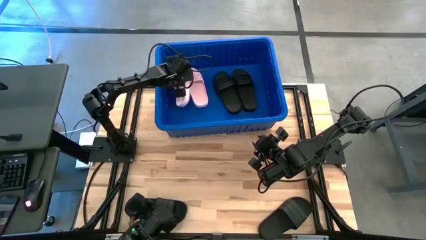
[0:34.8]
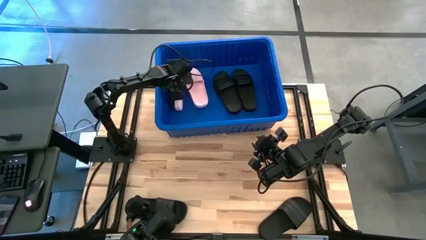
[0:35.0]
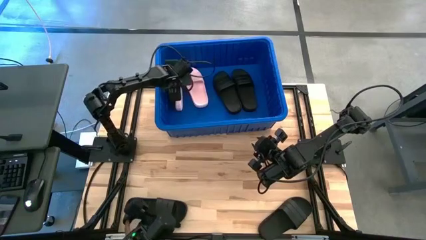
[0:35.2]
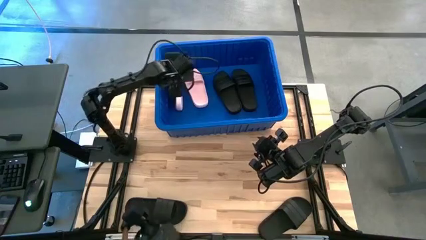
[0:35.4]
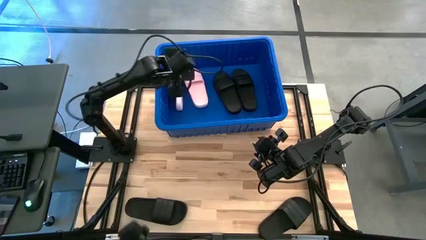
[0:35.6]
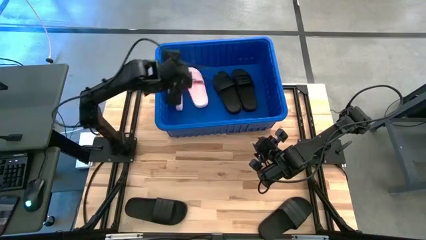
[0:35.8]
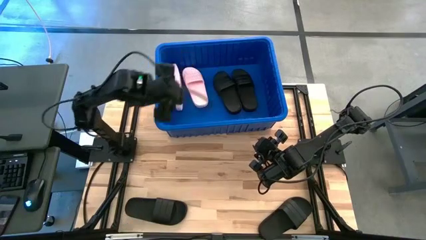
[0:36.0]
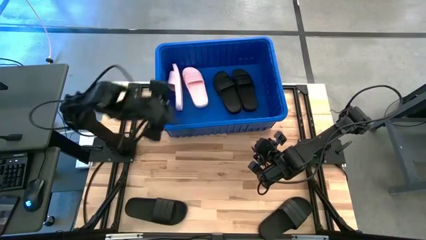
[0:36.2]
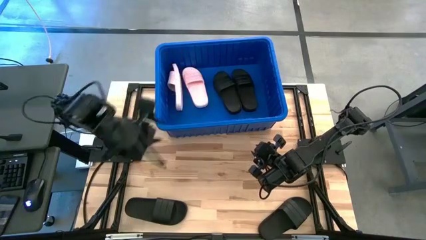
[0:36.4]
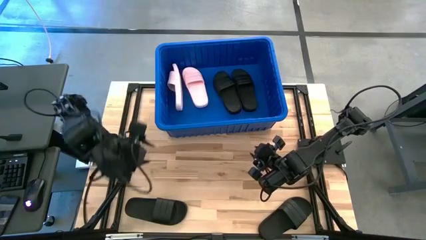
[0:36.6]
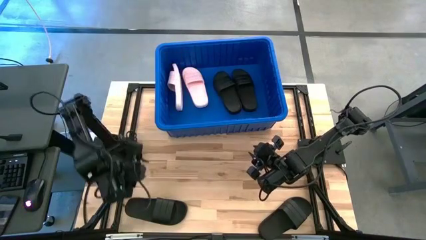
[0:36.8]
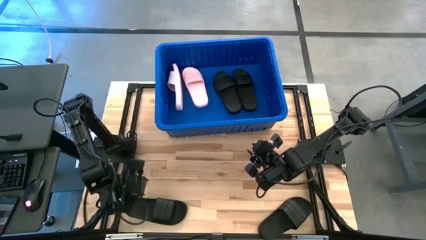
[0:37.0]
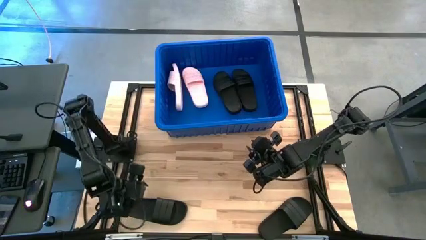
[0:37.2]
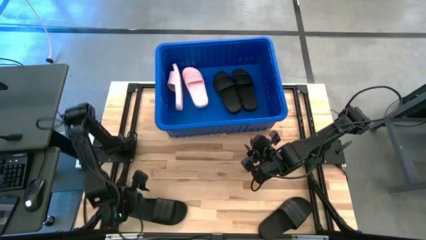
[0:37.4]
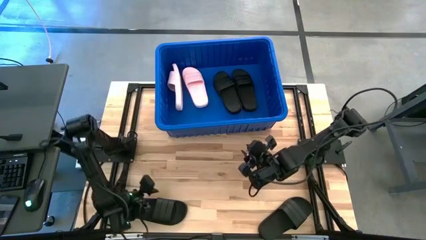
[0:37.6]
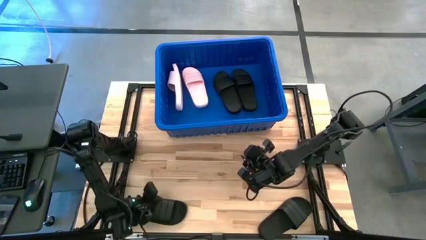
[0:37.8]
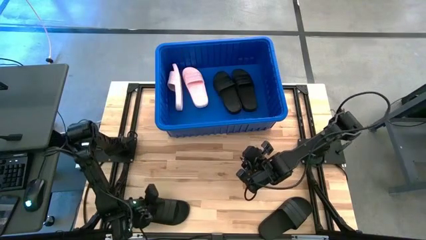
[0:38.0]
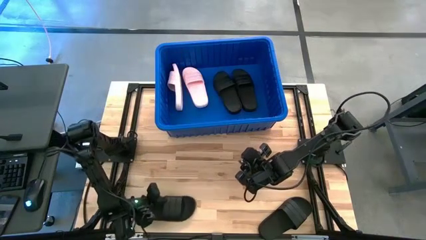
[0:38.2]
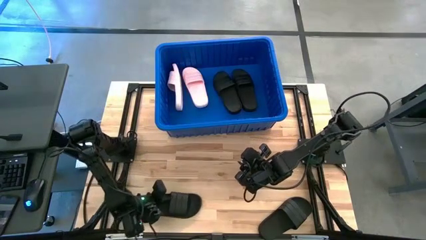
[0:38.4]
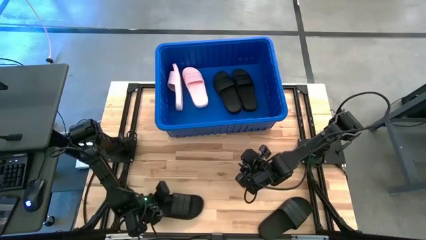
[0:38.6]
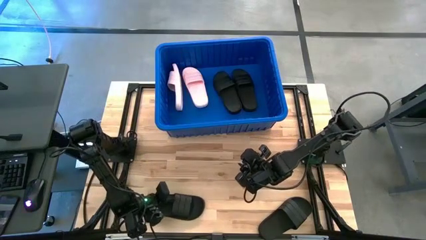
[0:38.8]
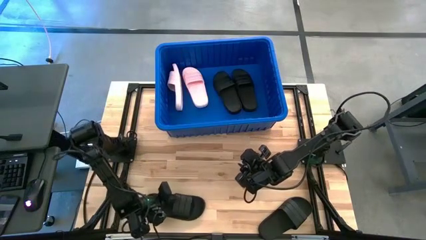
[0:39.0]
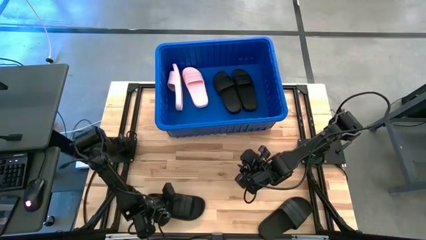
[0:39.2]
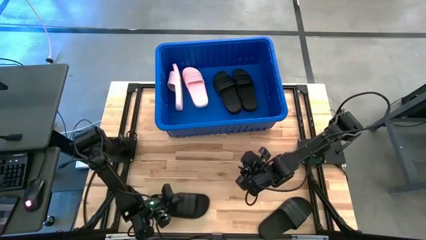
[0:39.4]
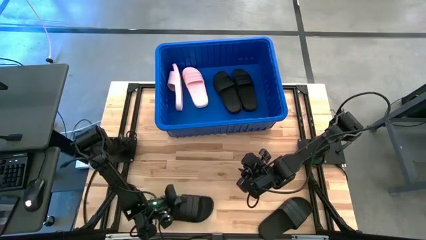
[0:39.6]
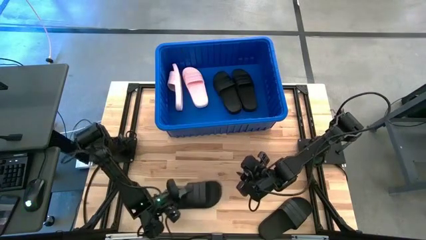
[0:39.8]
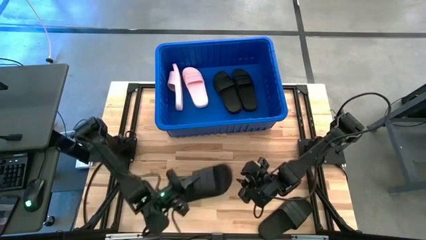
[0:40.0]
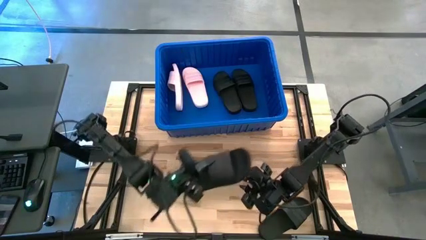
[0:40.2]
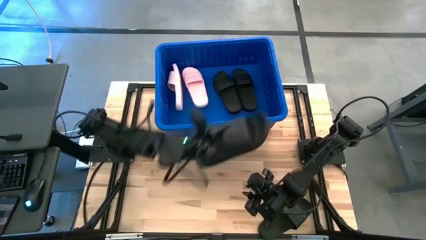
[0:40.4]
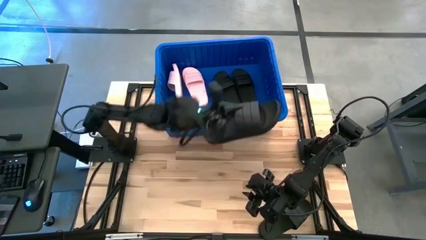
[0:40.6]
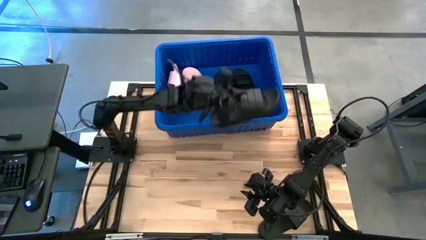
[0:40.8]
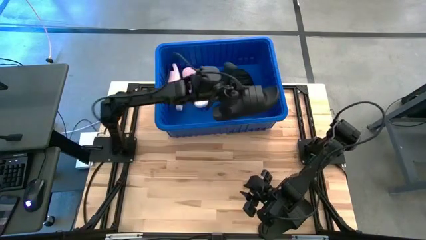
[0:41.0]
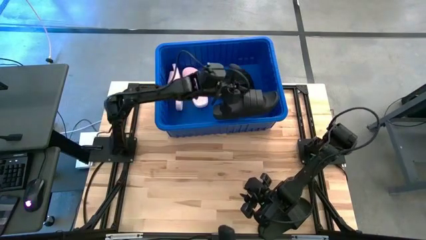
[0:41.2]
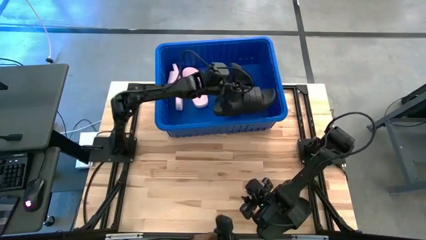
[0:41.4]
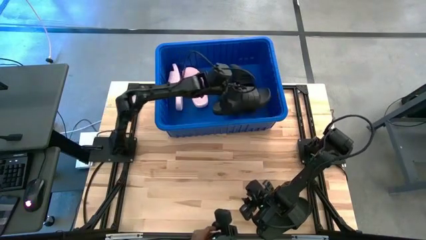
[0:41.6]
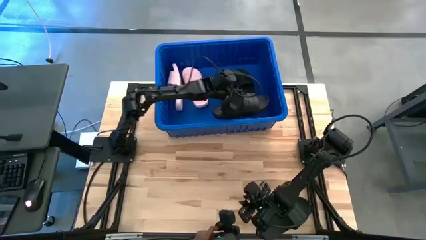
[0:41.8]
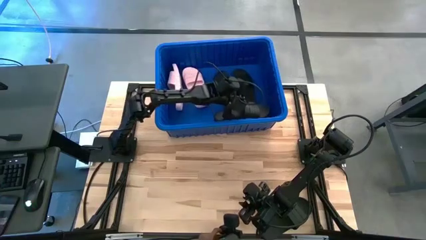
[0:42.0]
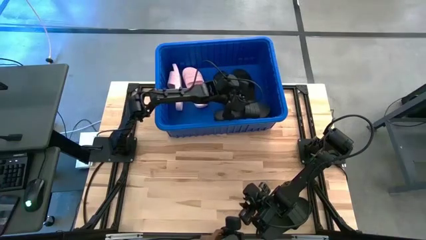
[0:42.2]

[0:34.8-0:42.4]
Task: Pick and place slides into bin
Put the black slide into the blue bin

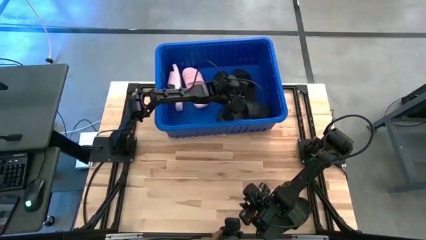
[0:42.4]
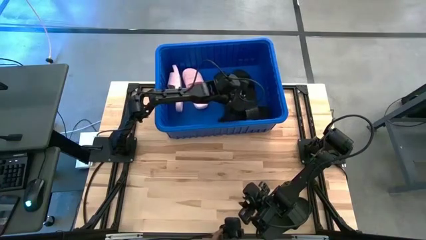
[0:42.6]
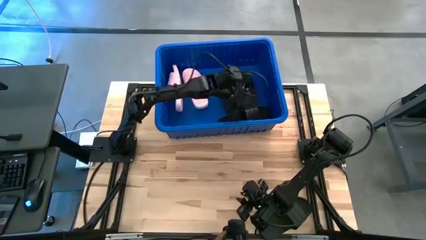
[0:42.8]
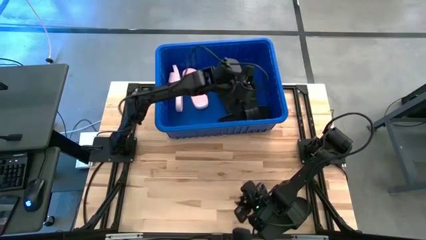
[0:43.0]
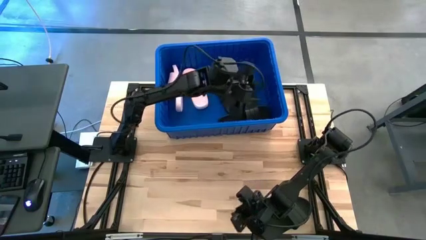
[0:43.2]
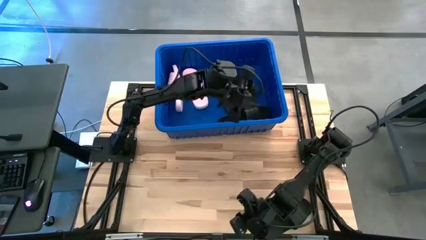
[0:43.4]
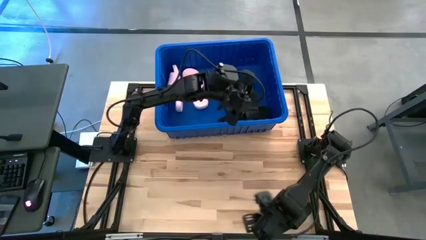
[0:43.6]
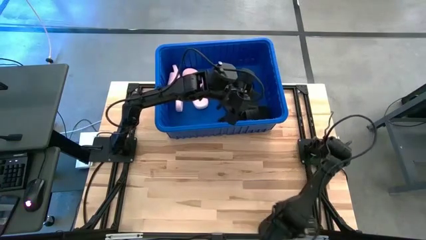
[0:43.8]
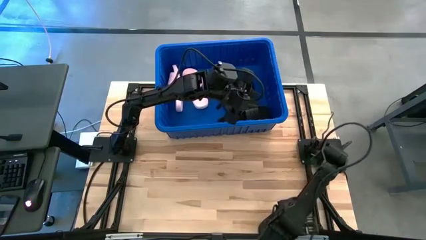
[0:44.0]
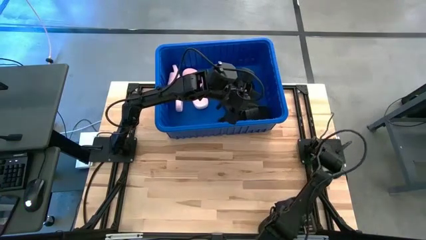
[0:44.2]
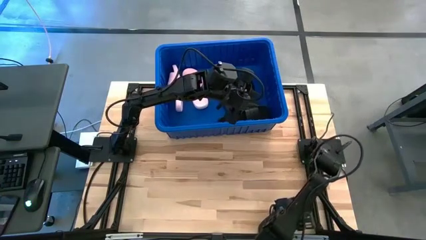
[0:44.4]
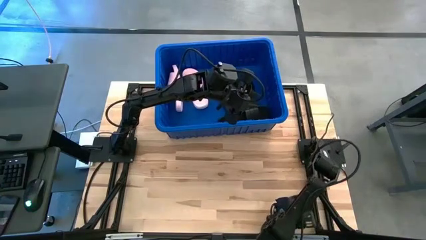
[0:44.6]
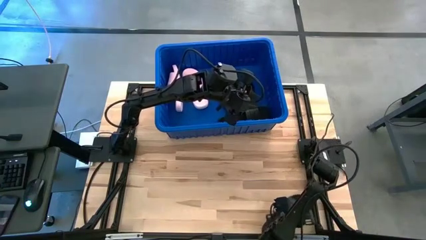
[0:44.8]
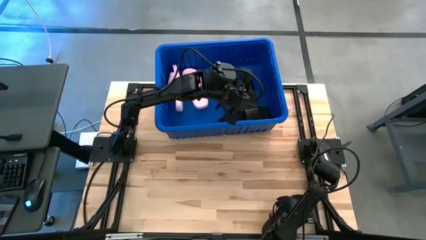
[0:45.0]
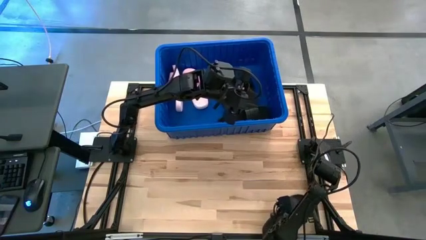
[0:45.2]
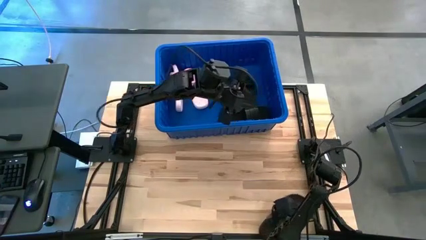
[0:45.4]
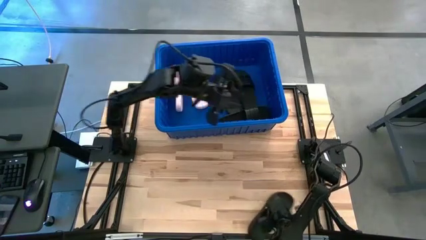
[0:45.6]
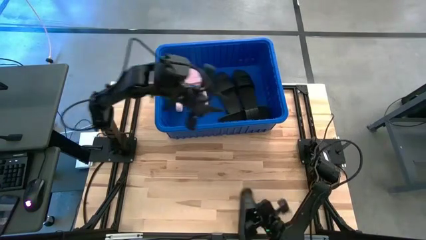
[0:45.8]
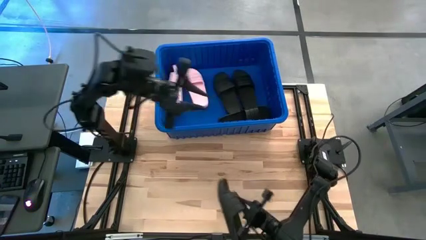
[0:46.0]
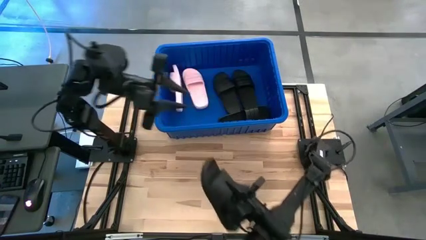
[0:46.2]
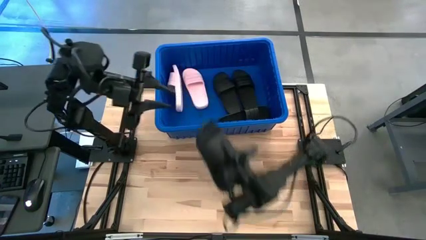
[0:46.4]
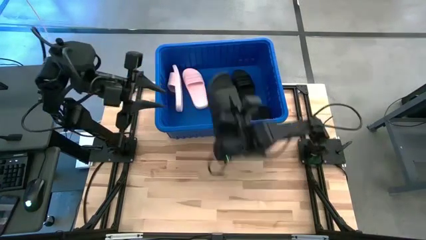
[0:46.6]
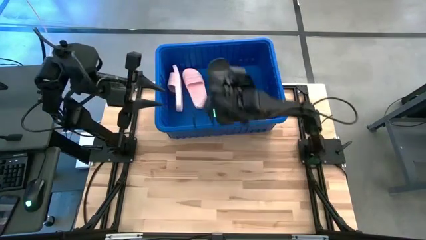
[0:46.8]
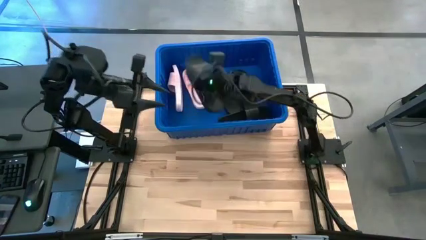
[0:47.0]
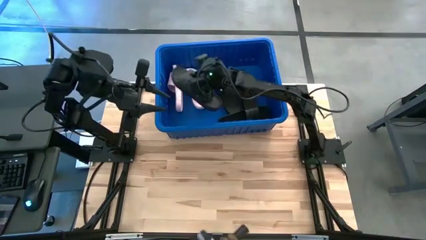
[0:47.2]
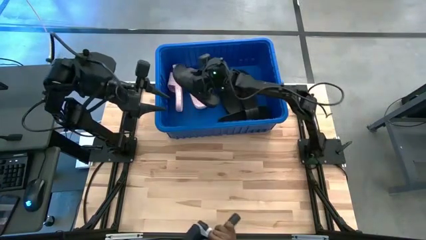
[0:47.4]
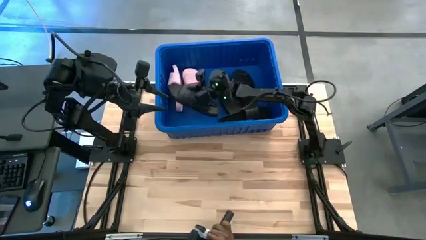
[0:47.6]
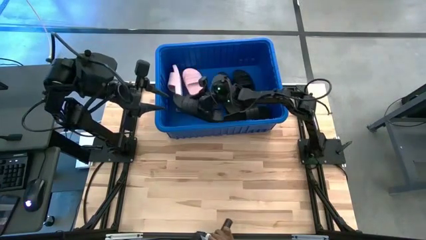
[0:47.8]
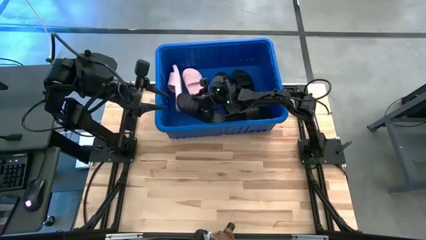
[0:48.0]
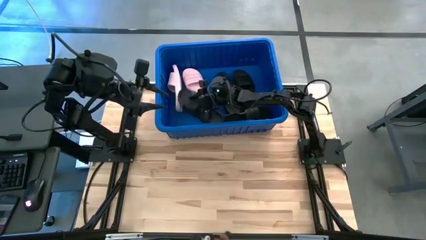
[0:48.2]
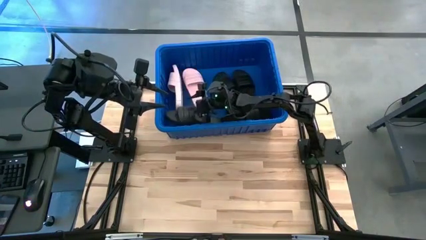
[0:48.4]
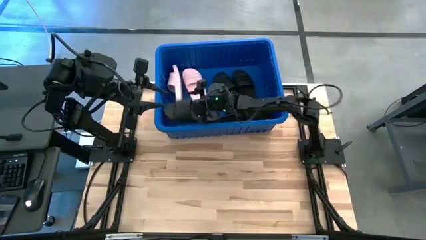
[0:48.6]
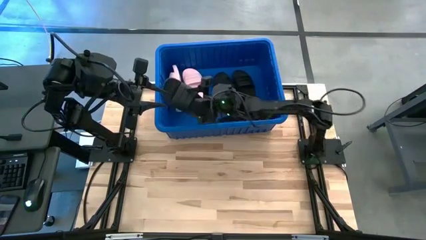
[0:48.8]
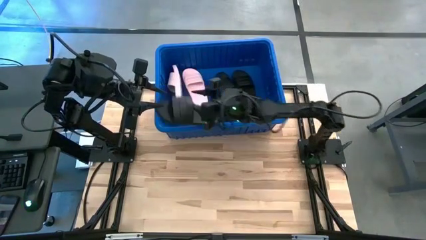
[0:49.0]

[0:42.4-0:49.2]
Put the black slide into the blue bin

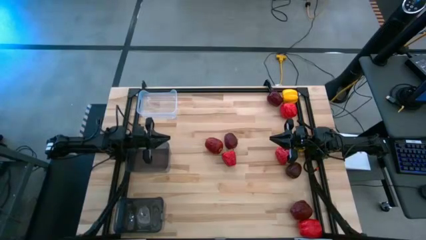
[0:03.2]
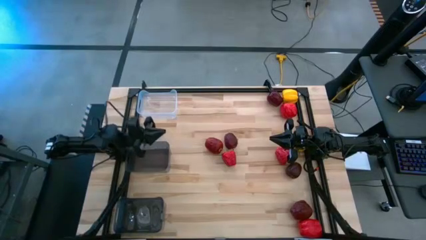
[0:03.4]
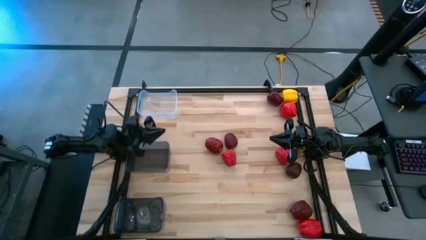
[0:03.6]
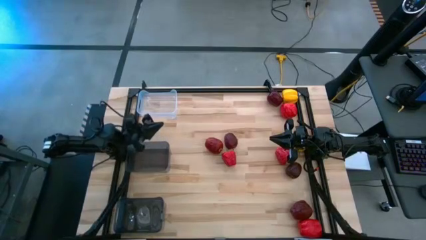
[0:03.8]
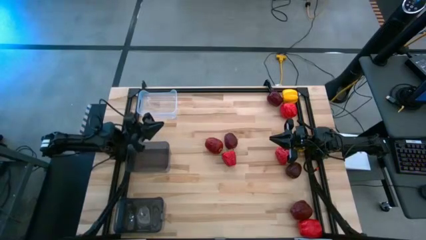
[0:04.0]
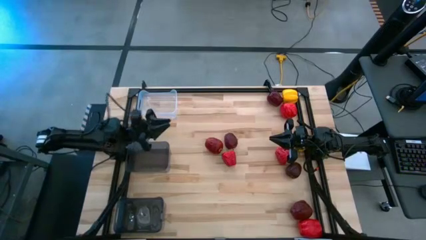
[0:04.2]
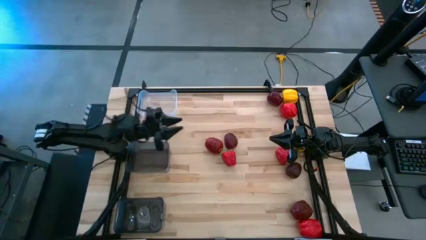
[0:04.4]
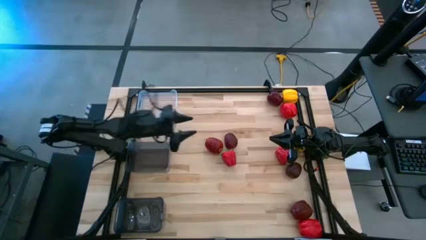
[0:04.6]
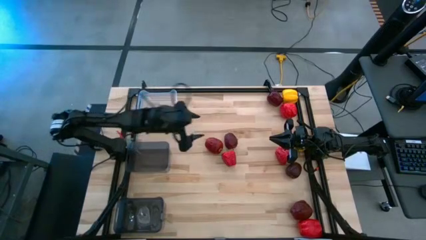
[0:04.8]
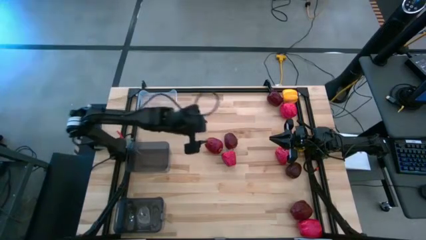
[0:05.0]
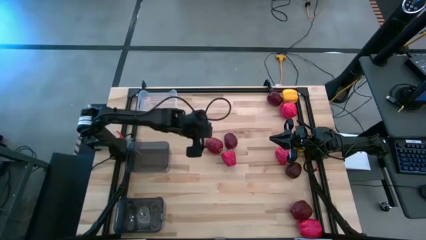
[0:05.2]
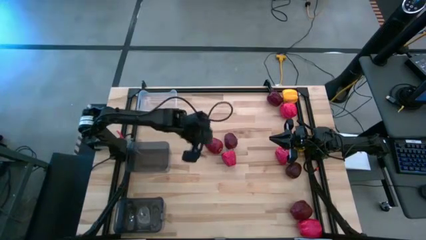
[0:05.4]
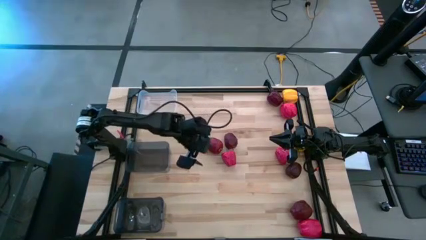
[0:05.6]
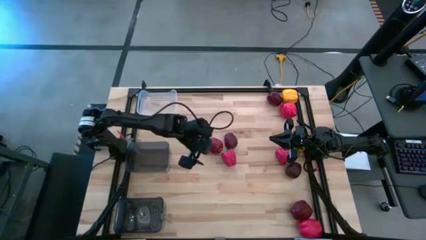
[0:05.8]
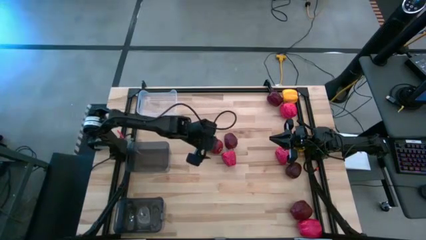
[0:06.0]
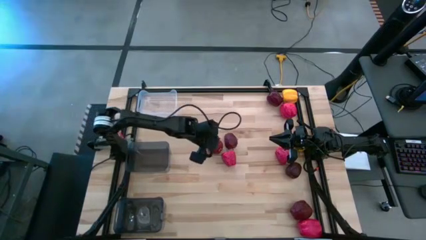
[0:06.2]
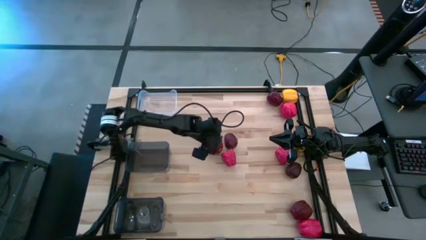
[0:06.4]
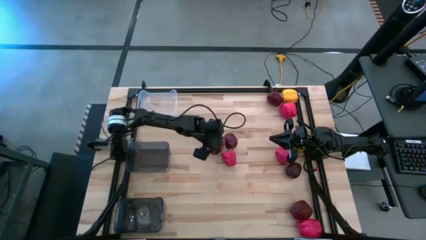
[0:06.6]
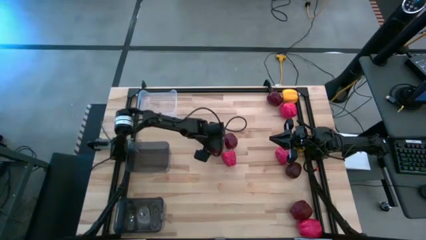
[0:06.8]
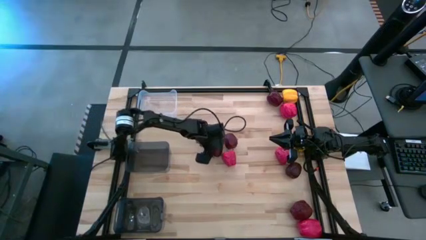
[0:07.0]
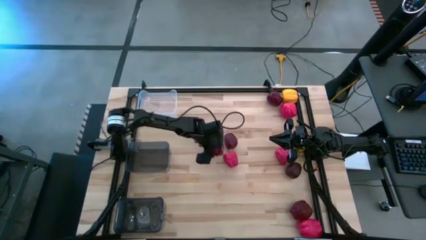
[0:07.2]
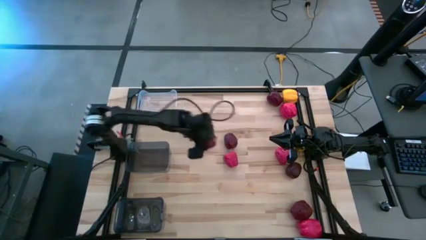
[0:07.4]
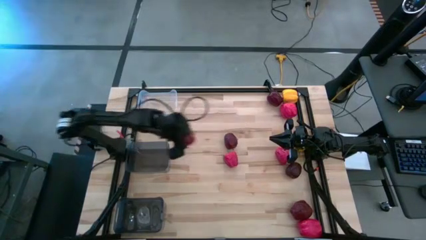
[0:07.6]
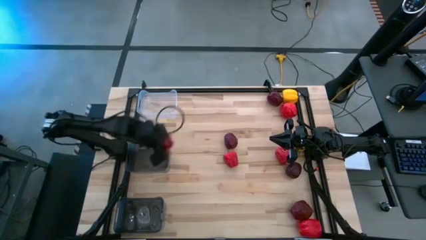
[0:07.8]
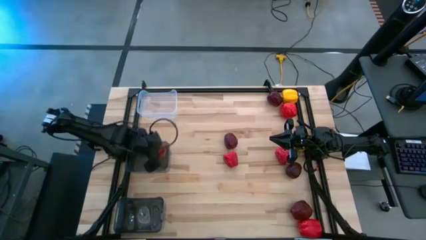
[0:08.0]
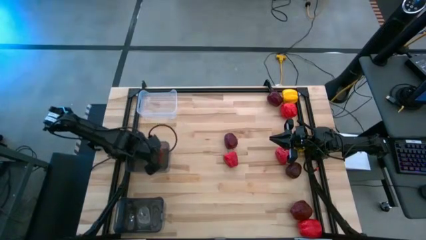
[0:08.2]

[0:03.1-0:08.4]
Task: Sort produce into baskets
Put the red apple into the top black bin
